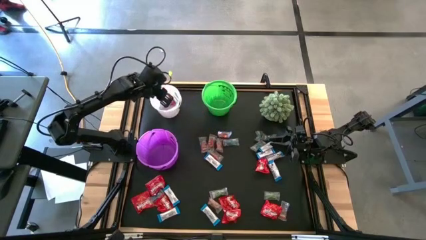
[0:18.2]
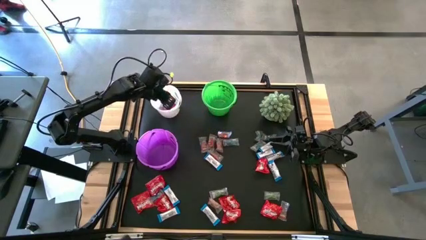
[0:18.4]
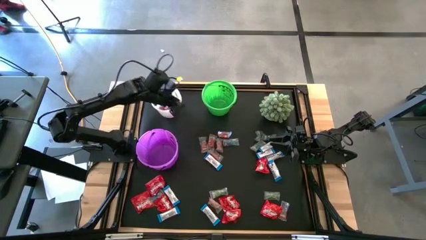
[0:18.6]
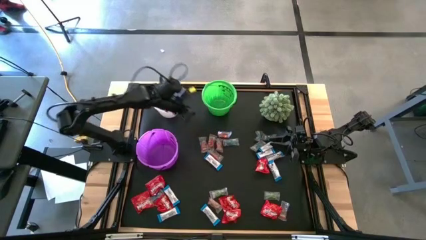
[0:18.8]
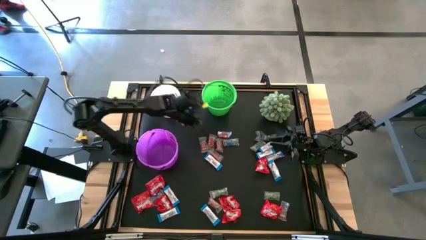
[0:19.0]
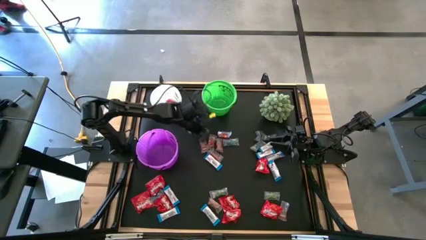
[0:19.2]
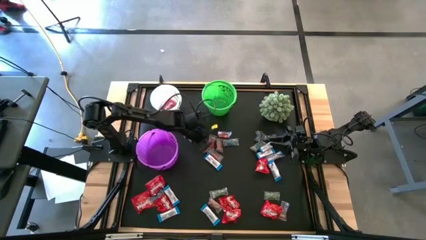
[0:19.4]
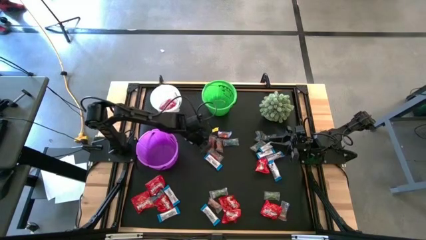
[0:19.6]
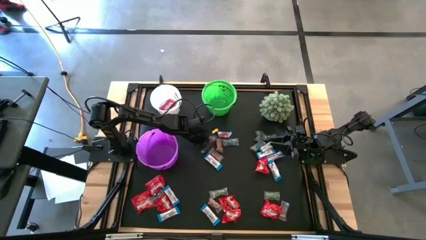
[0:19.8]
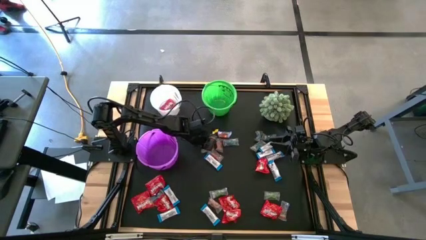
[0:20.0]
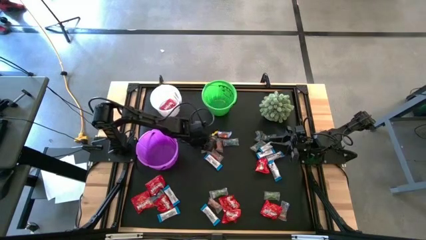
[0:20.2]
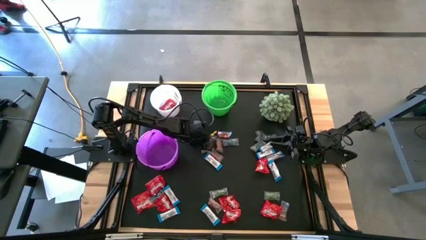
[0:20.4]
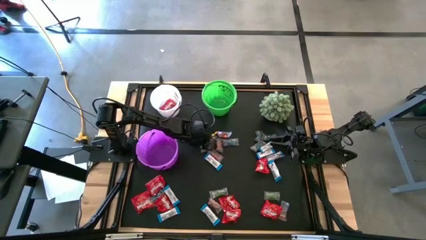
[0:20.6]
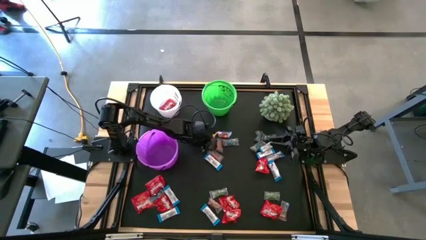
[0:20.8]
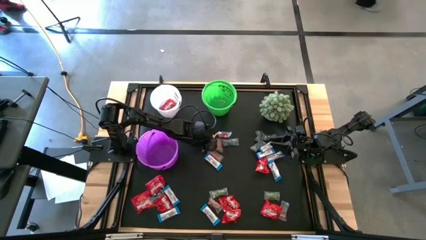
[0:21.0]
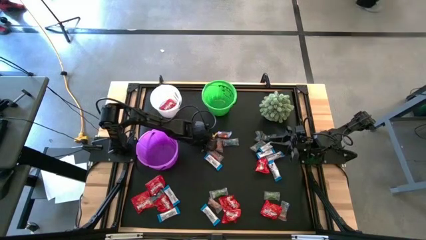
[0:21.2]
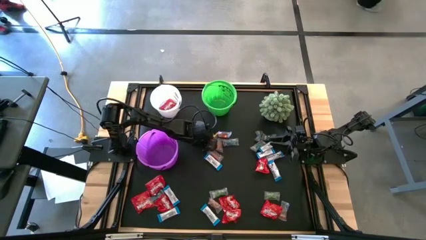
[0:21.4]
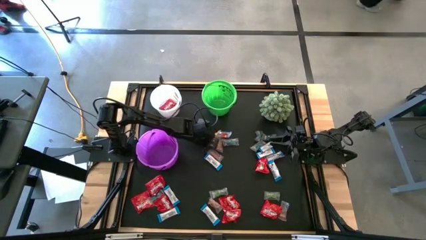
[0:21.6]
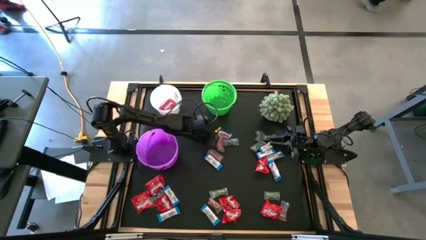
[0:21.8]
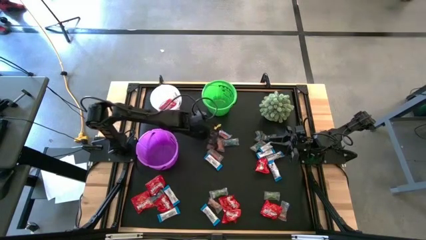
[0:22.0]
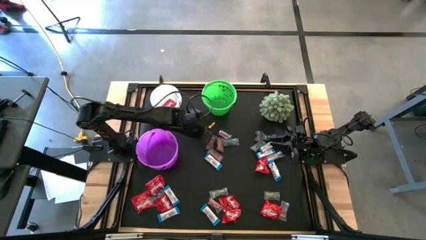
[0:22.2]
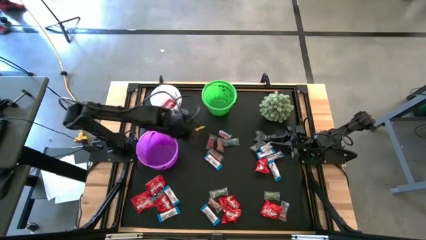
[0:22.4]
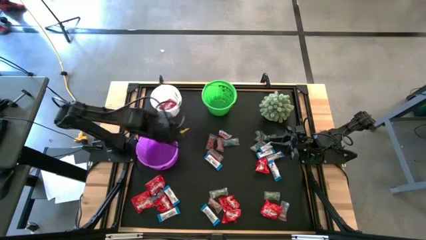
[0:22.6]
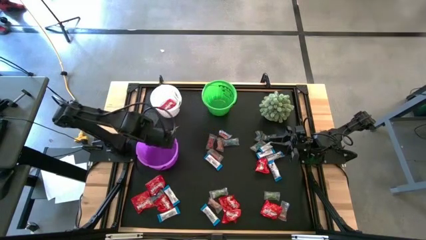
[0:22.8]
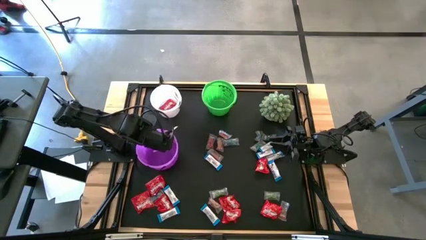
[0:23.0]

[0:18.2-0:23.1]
Task: Sort candy
Put the red gummy into the violet bucket

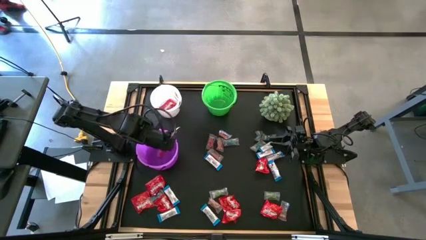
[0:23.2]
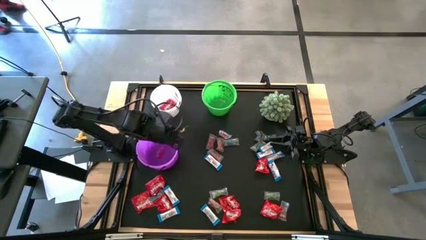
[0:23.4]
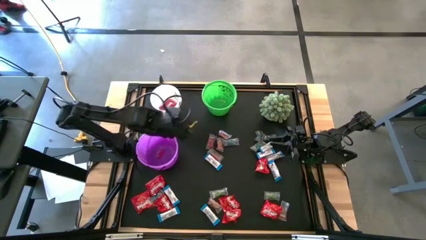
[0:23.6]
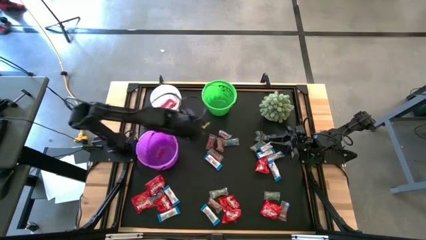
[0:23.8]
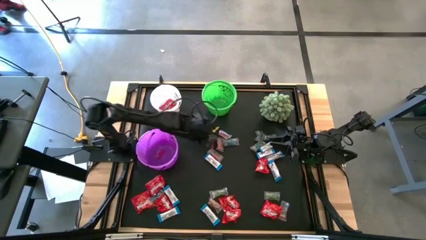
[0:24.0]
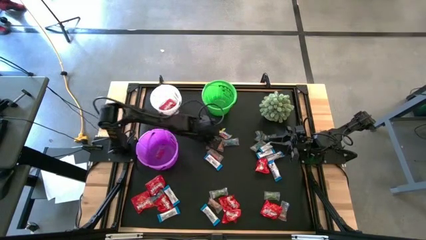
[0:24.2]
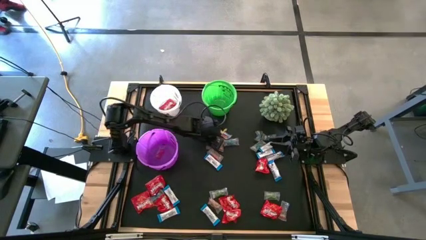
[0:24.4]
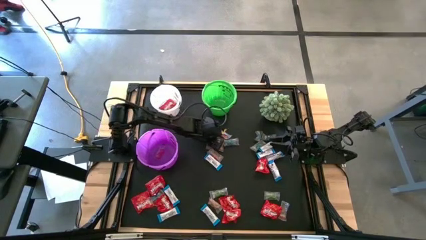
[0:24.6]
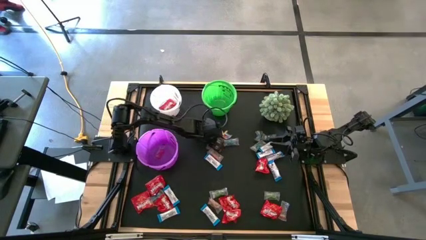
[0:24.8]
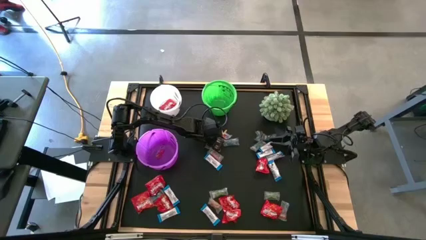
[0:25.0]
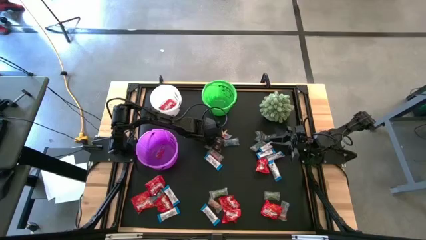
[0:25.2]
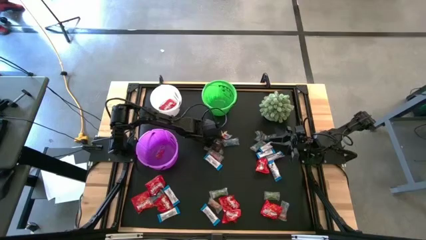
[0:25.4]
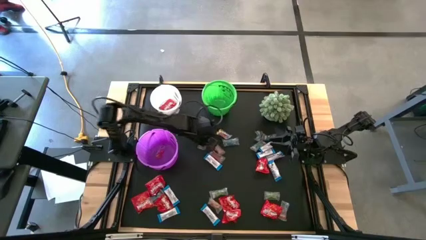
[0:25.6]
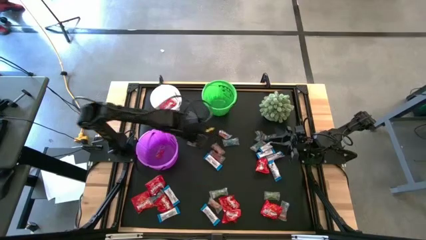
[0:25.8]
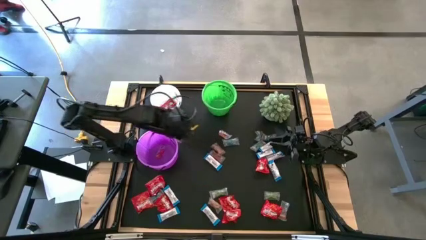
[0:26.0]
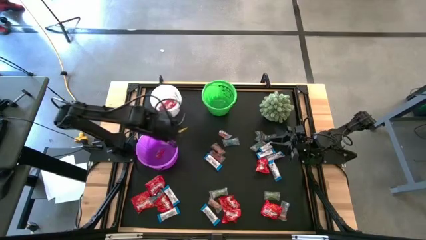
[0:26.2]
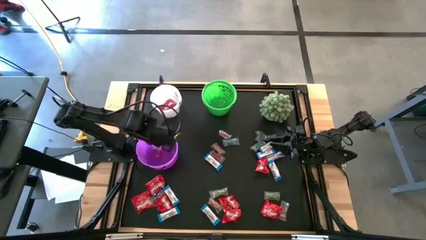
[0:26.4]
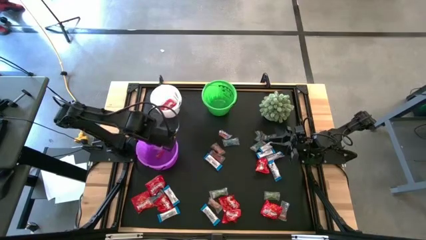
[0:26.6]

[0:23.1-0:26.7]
Put the red gummy into the violet bucket

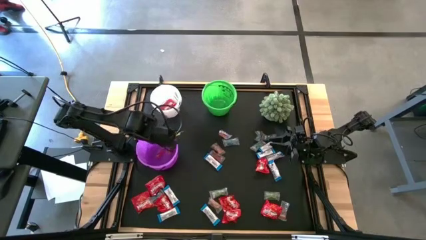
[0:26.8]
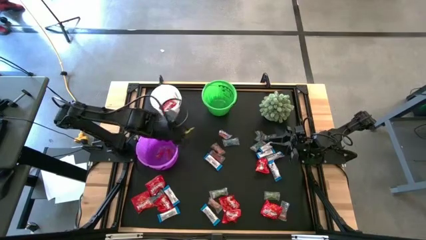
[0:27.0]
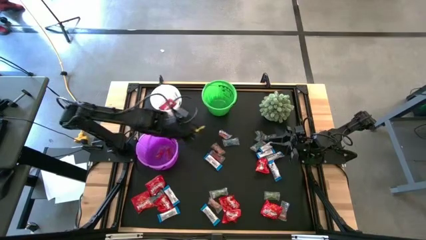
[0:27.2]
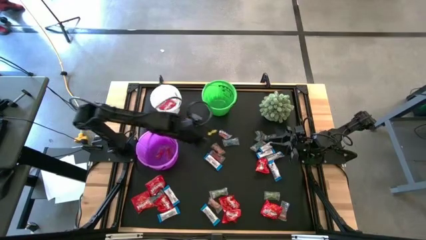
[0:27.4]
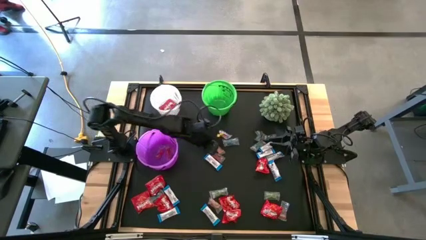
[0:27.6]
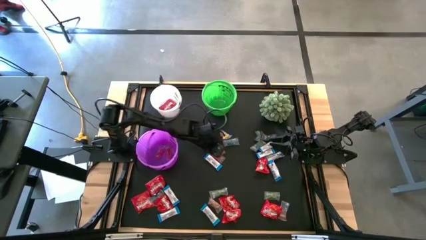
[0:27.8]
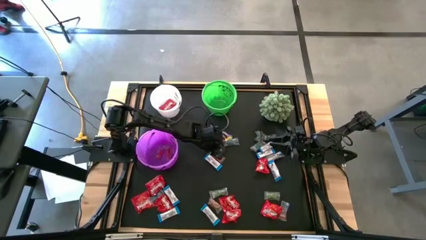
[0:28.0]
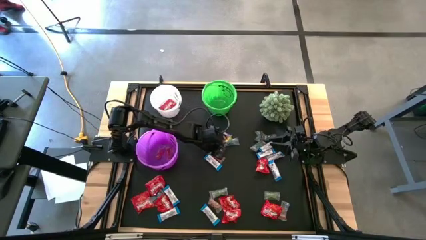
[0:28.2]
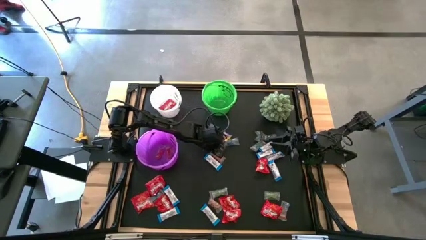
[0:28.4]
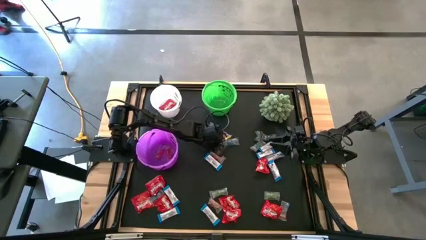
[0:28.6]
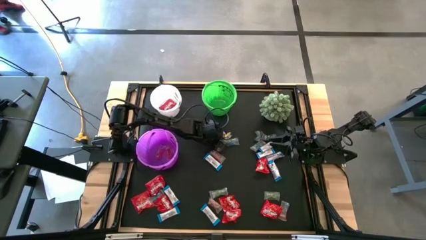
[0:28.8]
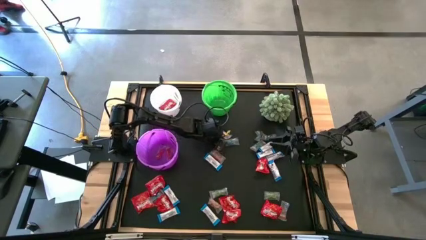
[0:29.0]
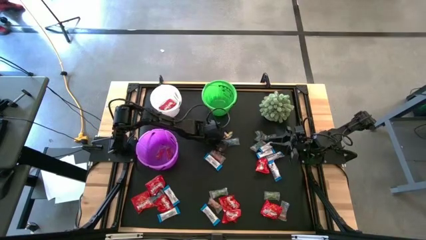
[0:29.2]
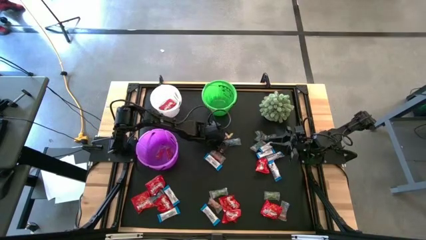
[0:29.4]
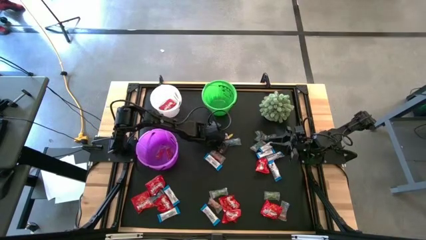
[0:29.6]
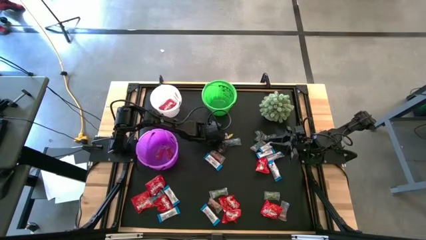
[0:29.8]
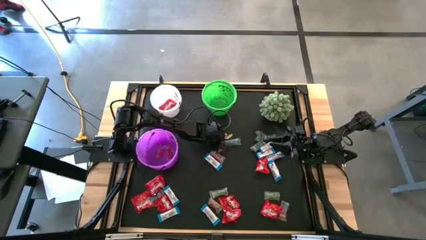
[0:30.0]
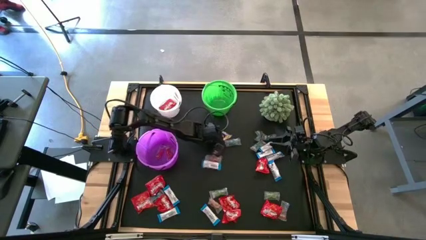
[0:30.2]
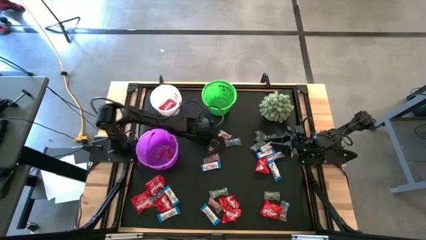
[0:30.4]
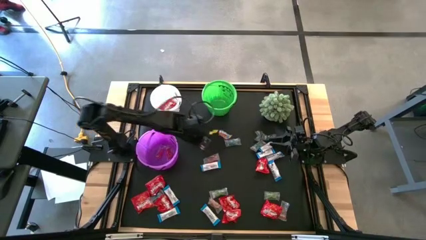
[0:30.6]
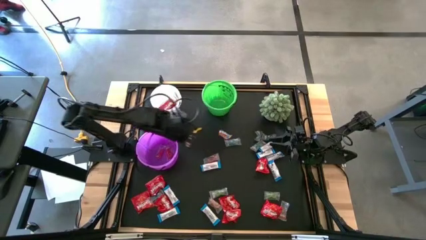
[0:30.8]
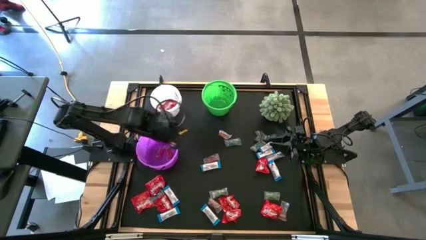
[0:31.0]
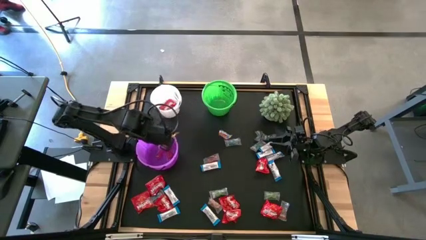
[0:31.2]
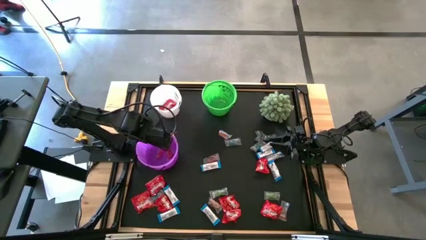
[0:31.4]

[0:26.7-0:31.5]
Put the orange gummy into the violet bucket

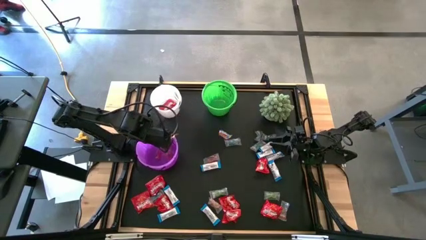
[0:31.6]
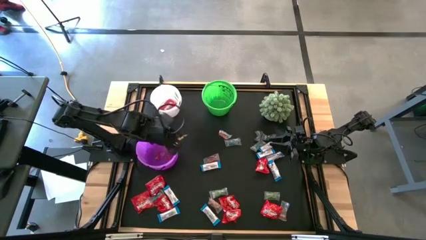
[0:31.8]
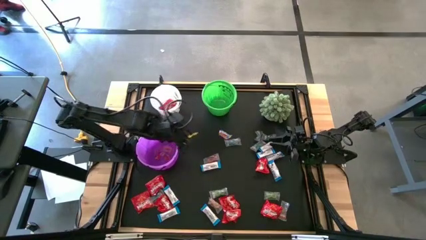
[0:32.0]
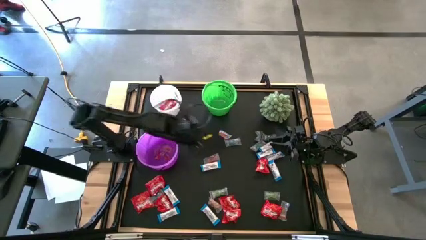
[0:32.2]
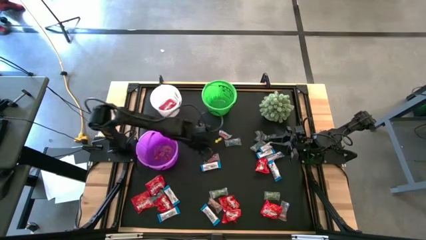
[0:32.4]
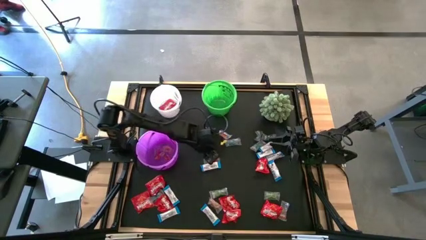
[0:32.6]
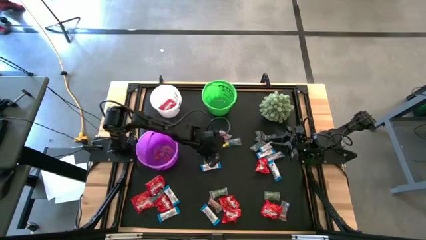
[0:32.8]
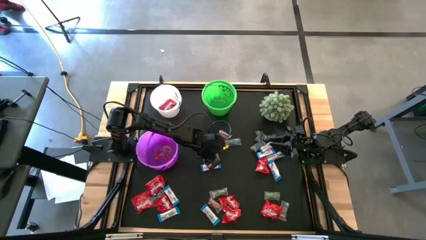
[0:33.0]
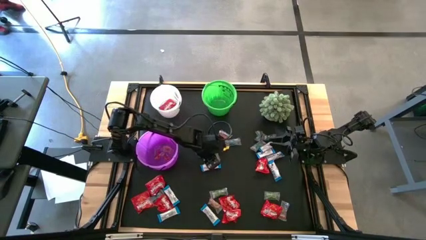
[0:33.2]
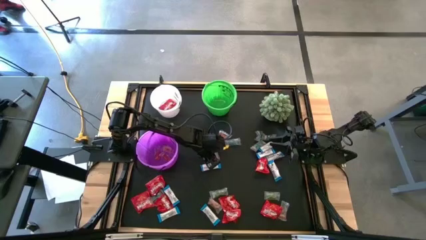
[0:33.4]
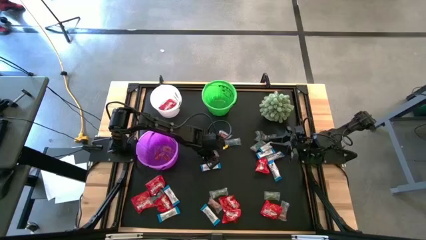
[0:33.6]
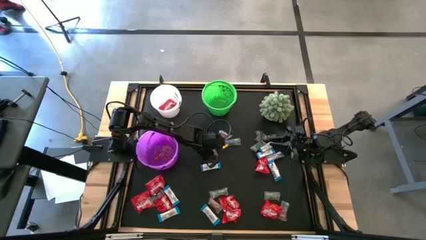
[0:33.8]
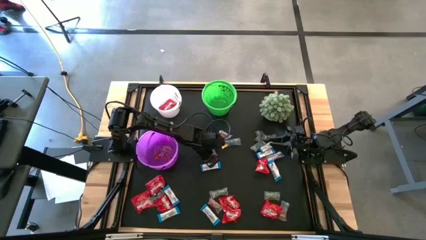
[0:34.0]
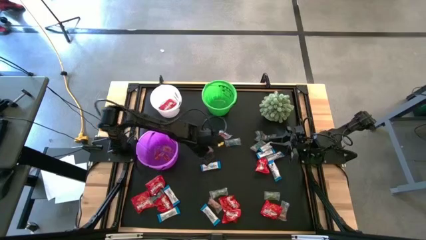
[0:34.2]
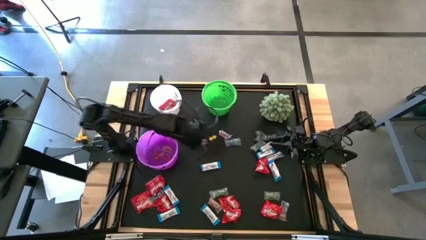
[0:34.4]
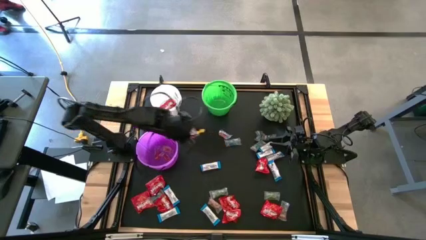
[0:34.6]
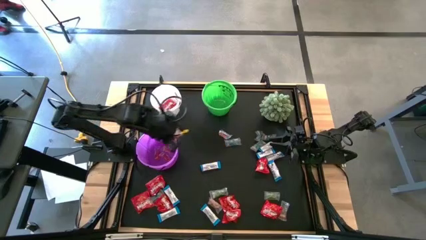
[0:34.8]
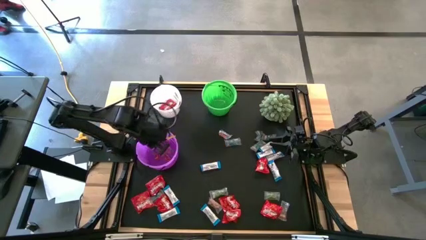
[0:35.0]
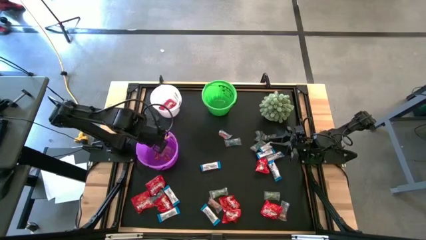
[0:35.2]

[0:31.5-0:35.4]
Put the red gummy into the violet bucket
